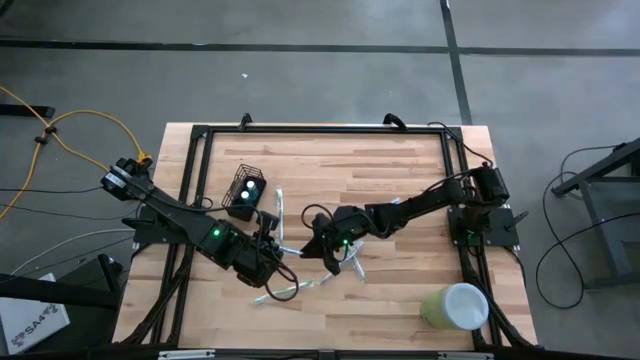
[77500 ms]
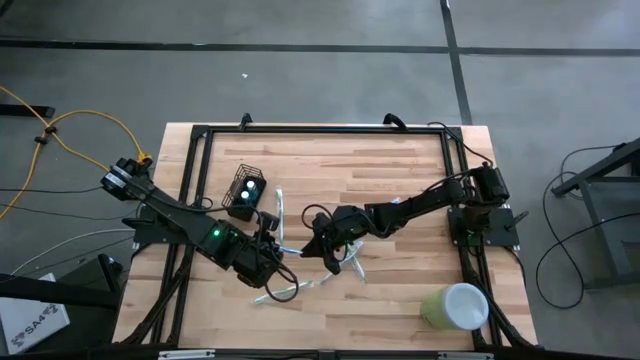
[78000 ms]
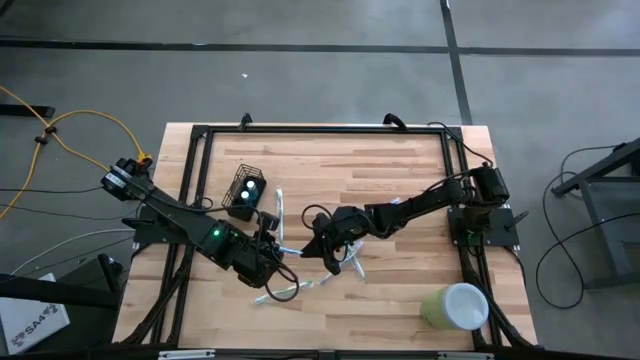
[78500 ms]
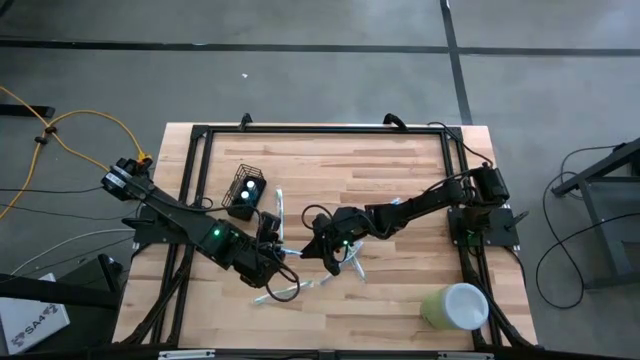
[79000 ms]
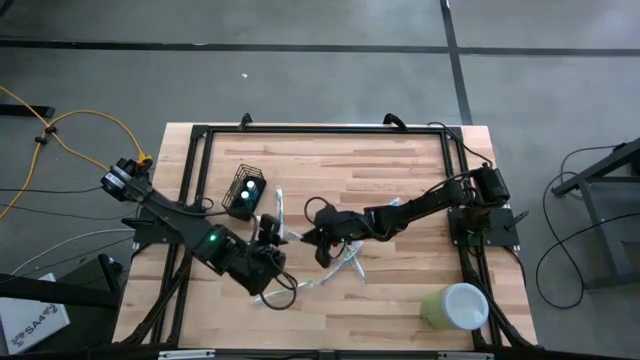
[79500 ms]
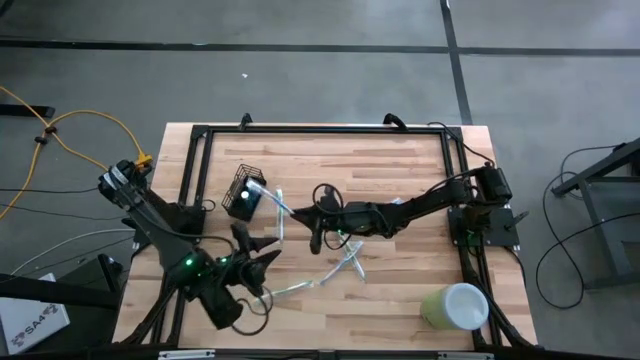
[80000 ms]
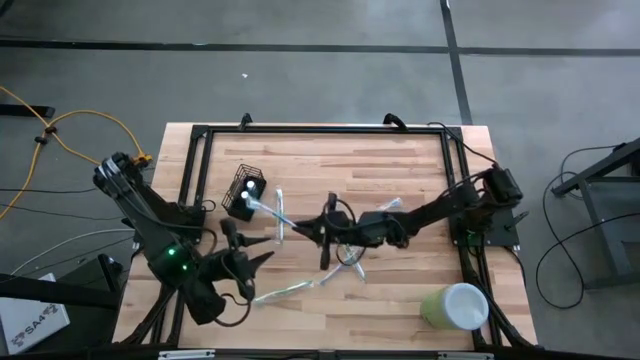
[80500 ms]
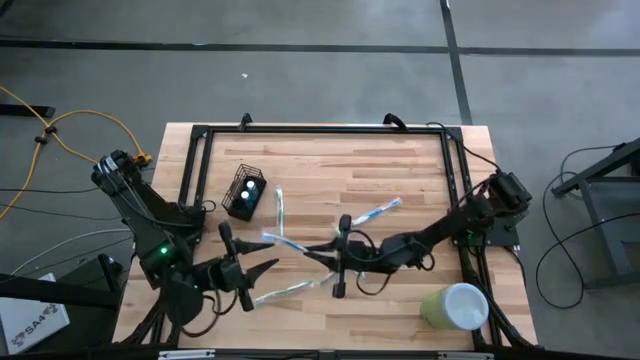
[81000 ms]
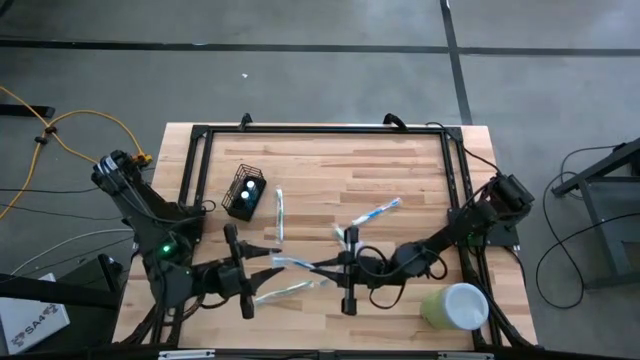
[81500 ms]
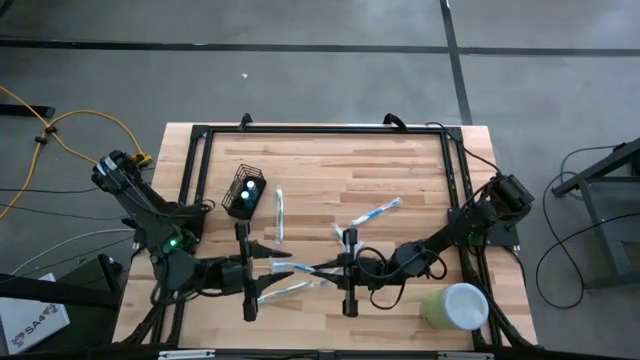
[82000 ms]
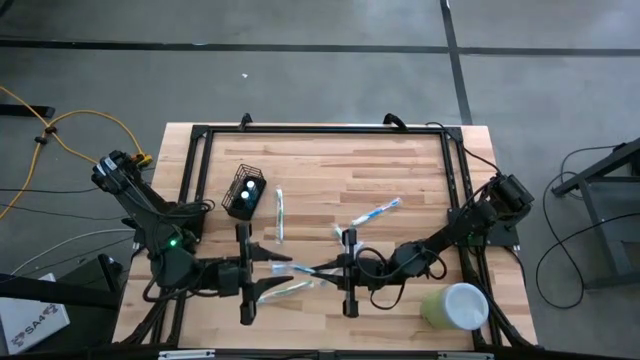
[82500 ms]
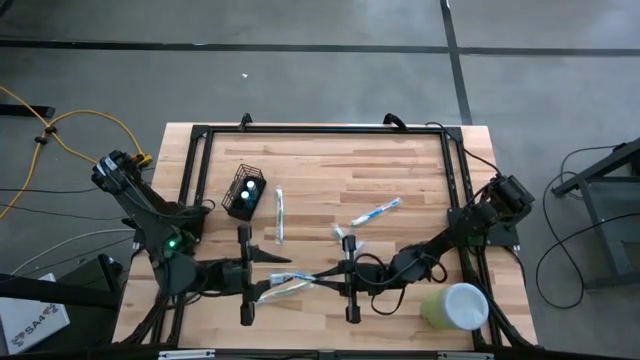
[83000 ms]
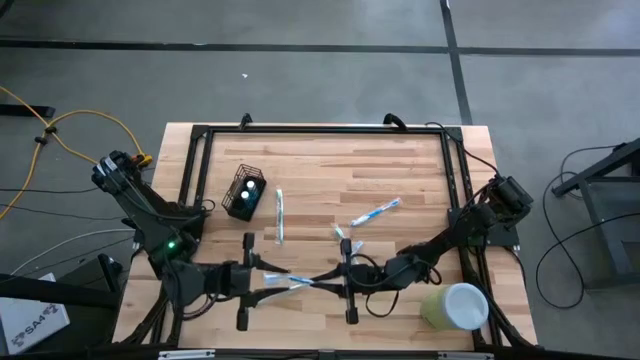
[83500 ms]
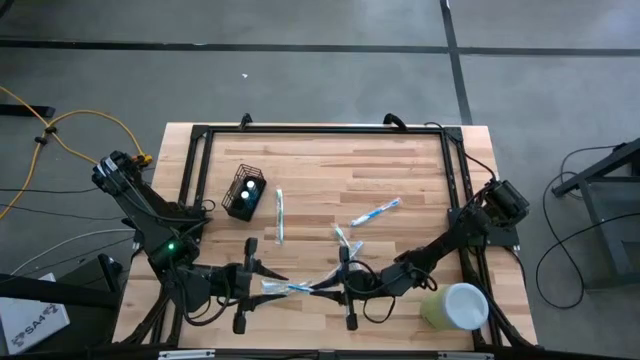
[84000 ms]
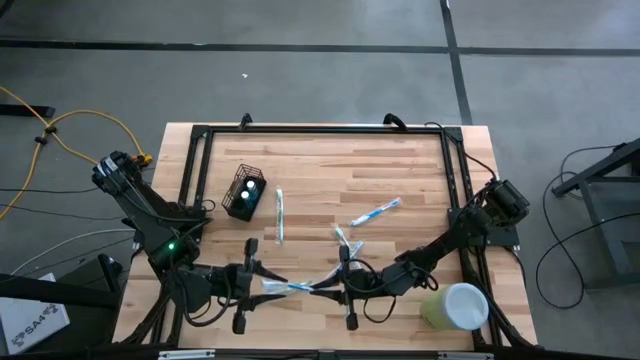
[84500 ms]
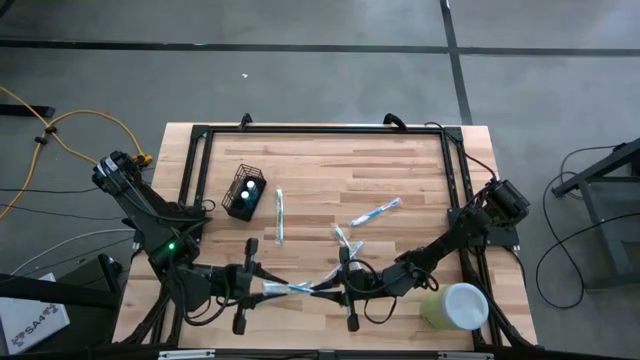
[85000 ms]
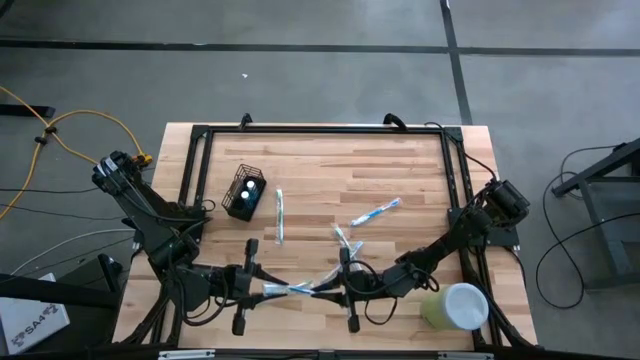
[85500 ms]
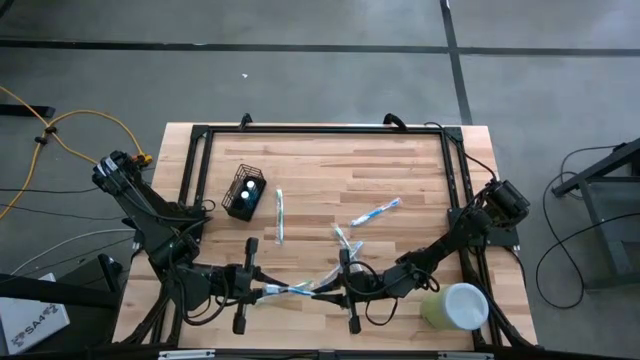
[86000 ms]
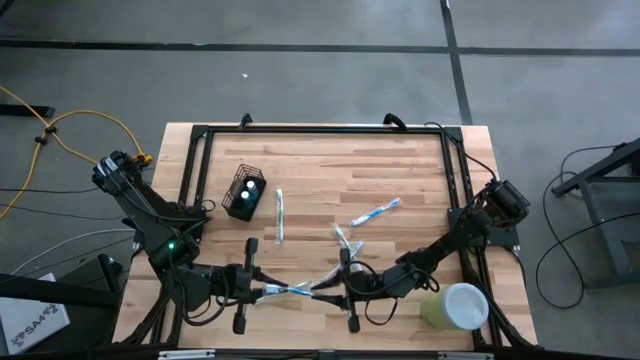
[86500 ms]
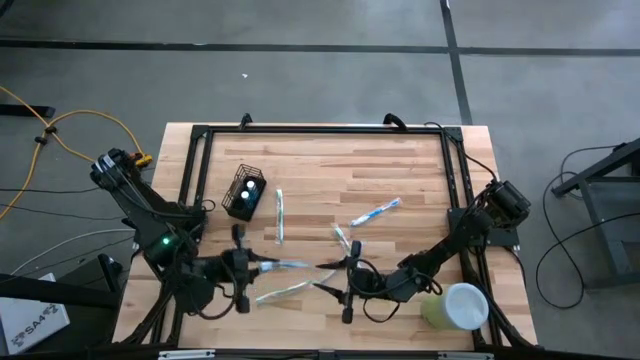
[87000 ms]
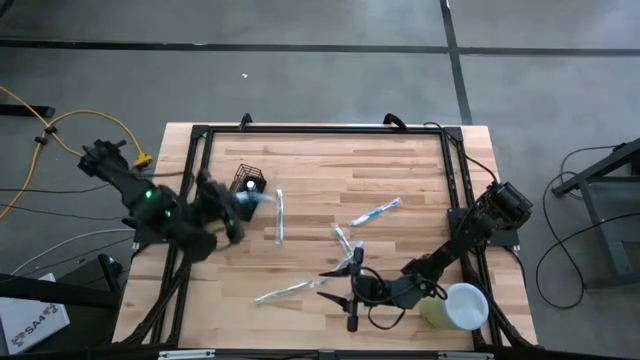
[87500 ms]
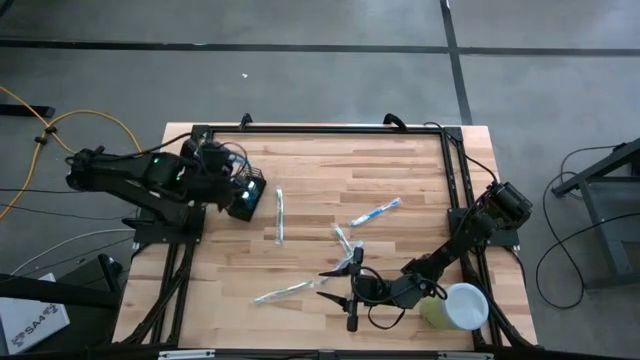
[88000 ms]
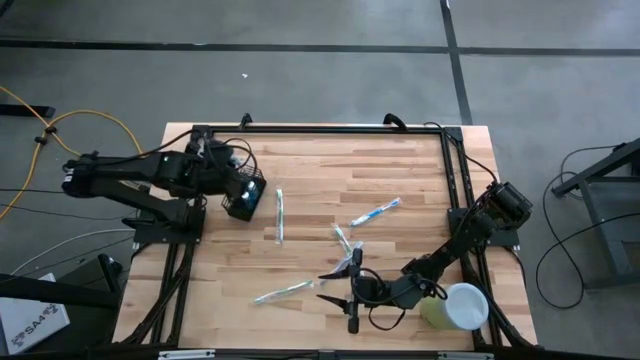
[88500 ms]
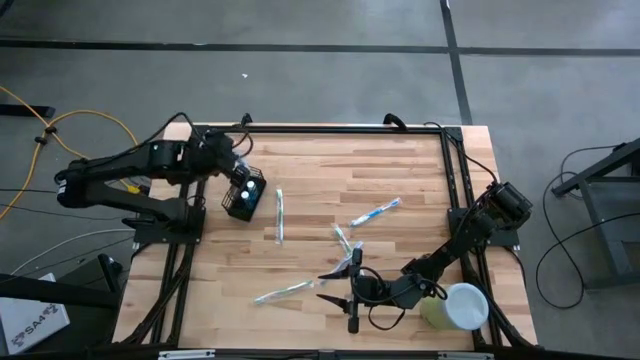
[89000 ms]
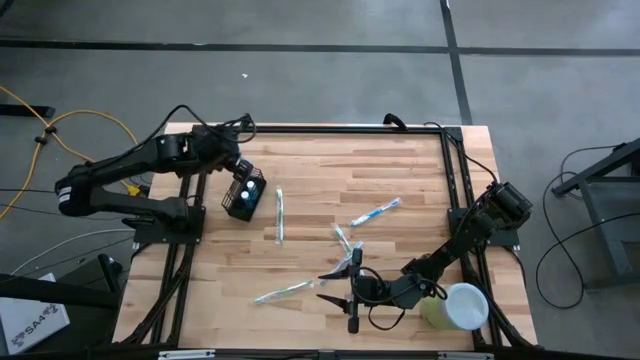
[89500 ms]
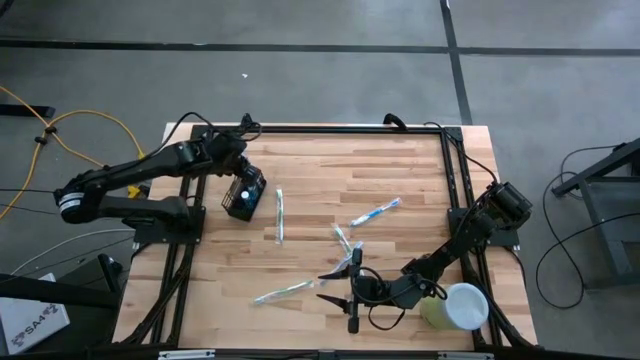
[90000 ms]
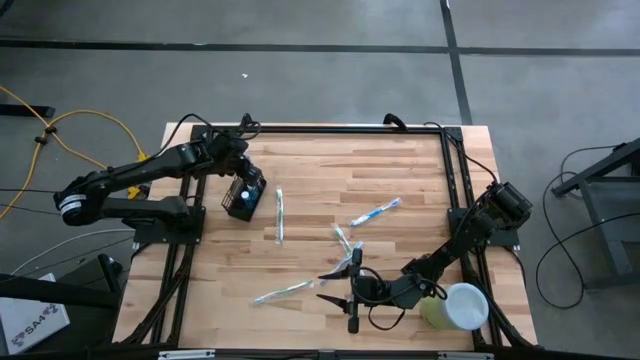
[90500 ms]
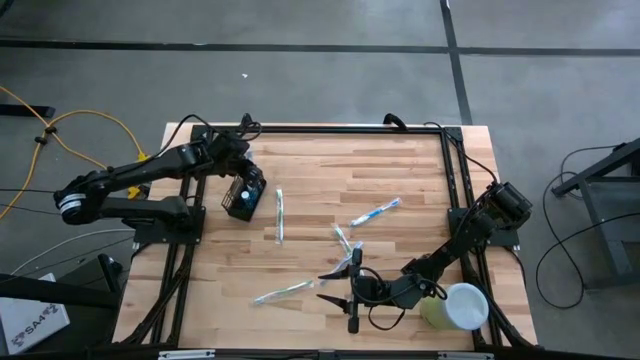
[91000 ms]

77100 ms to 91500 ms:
Task: Pick & Place toothbrushing station
Put the left blue toothbrush into the black wire organizer

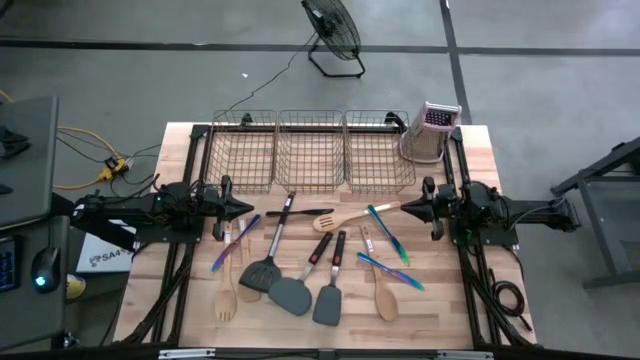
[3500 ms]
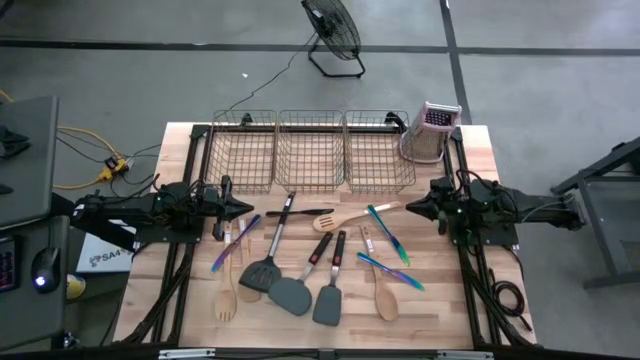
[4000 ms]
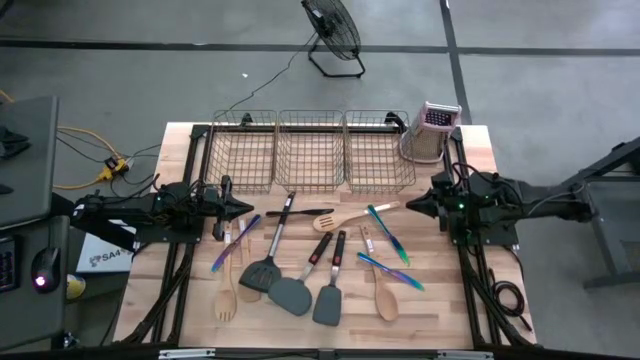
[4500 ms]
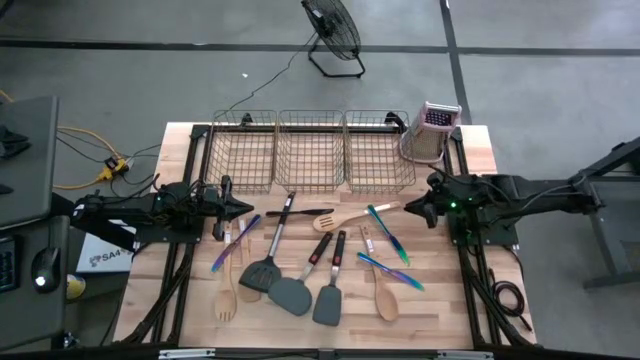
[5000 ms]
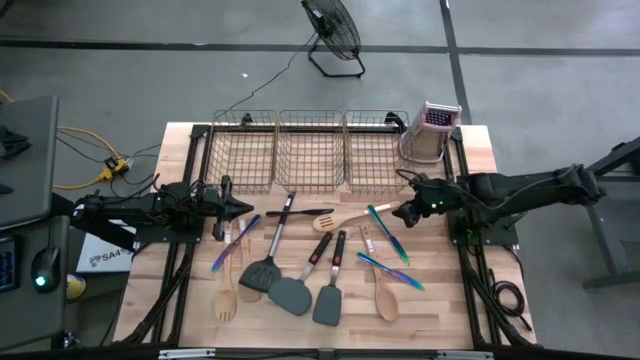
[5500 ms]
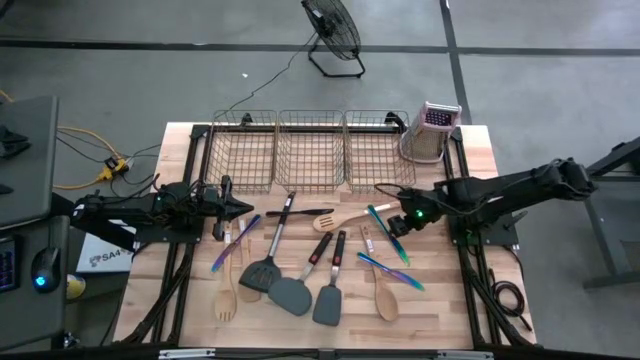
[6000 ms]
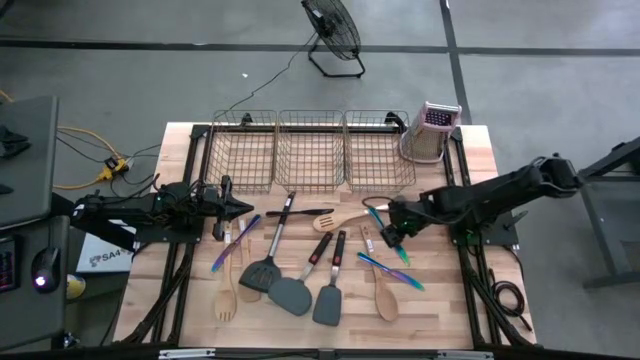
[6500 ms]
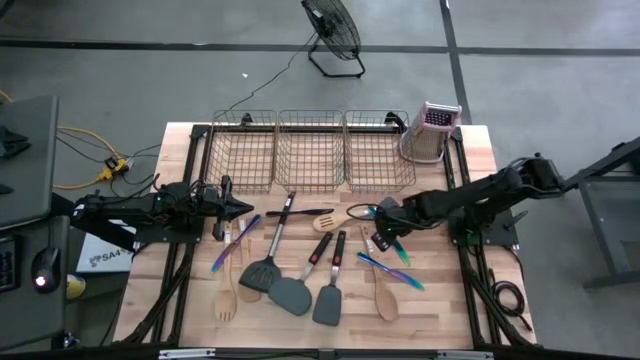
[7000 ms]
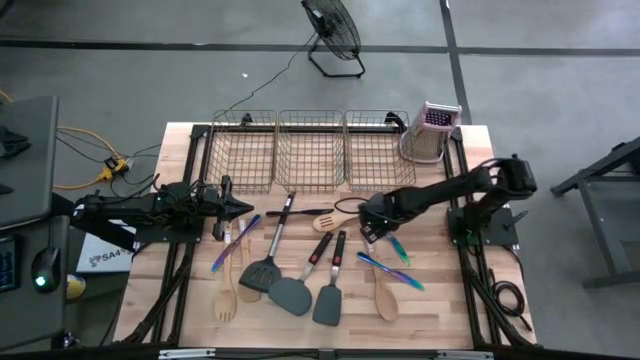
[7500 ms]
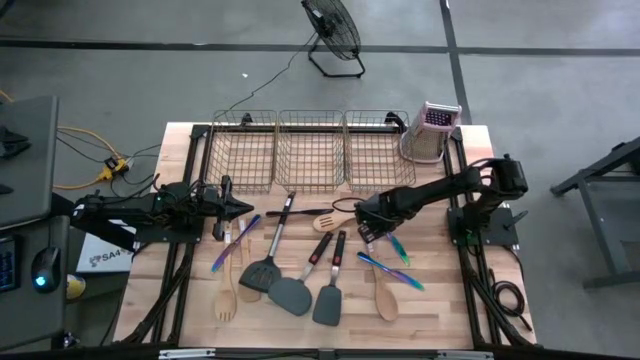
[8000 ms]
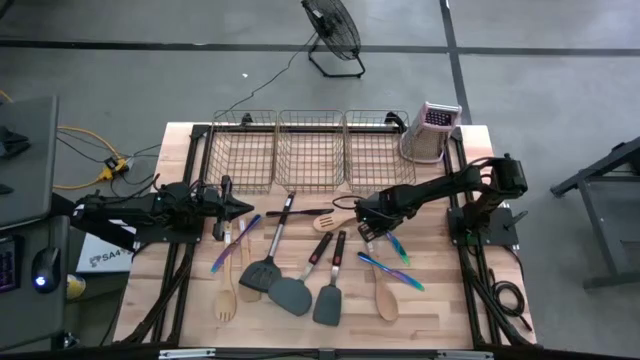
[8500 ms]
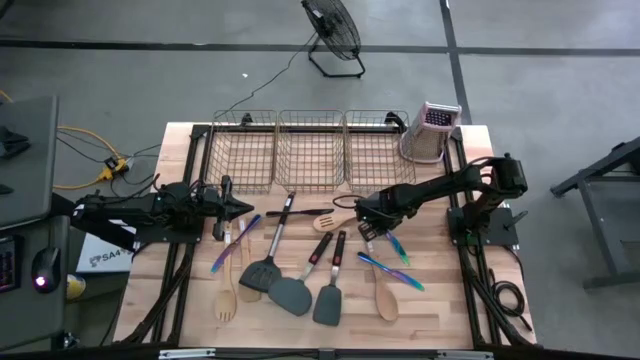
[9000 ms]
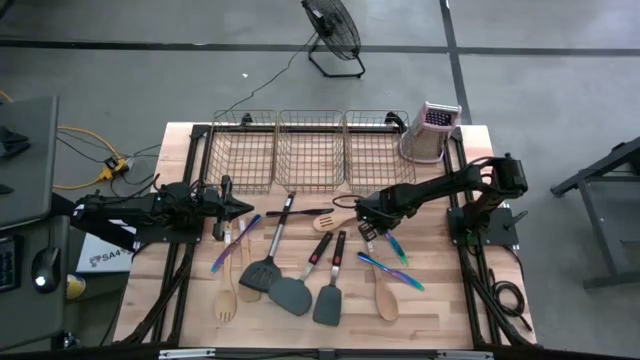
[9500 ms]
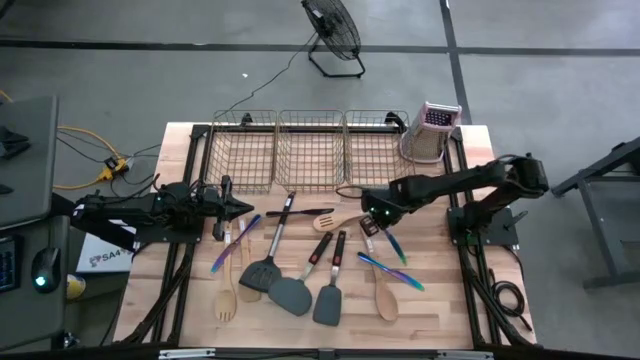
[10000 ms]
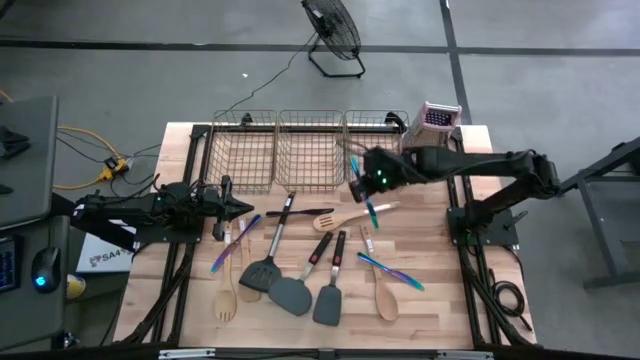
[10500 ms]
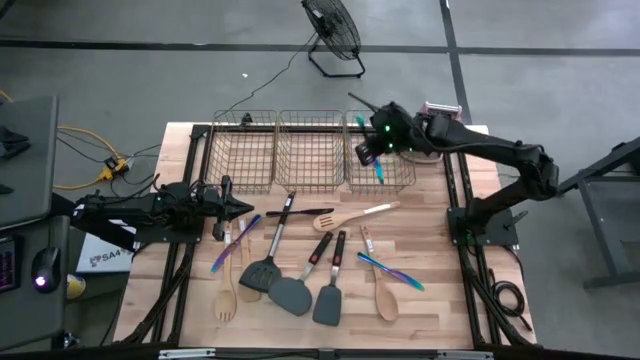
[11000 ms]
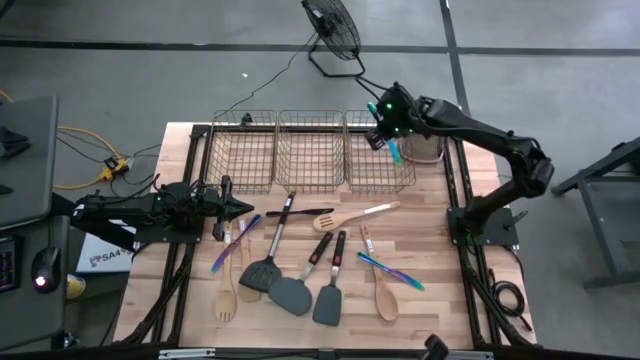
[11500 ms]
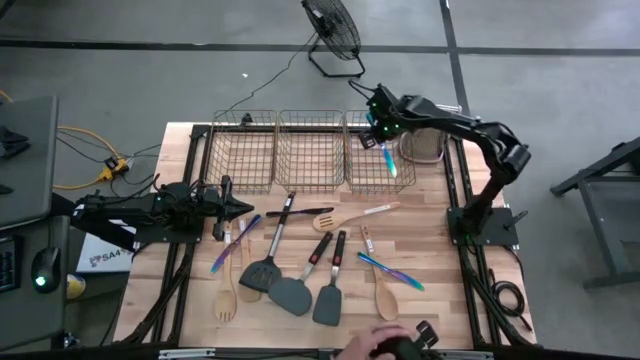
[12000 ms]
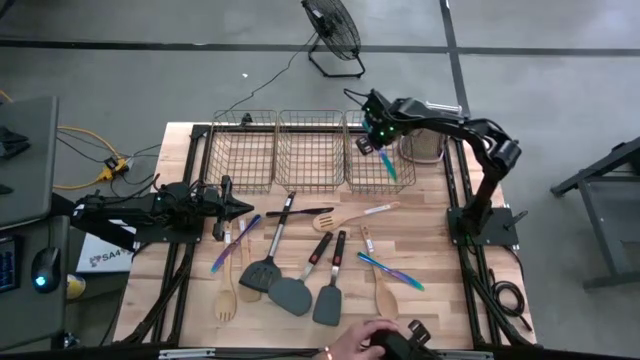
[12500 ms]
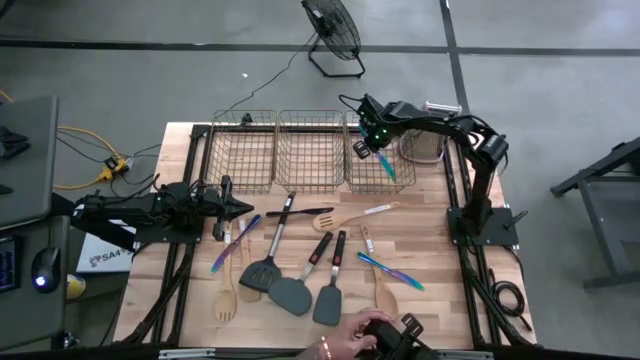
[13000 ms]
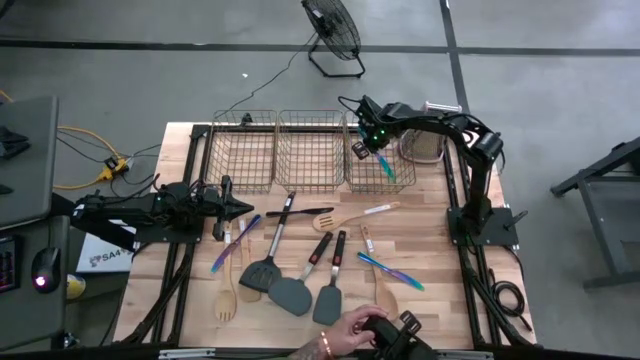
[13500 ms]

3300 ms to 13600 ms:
Task: Pick & Place Kitchen Items
Put the top right blue knife into the right wire basket
